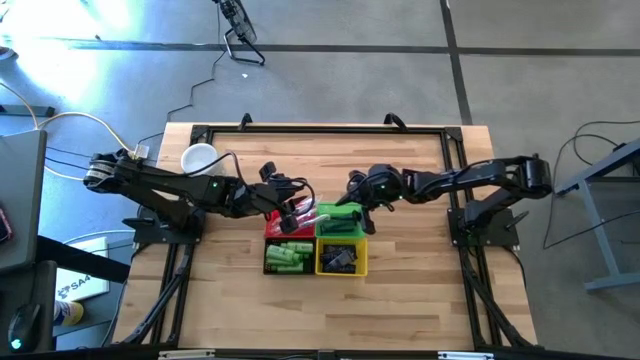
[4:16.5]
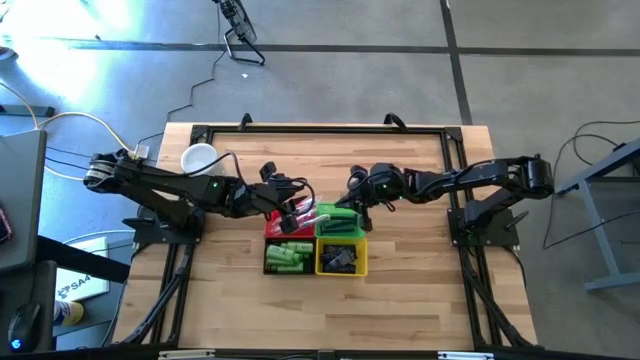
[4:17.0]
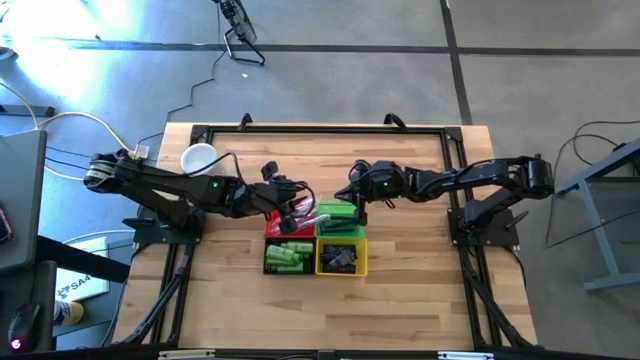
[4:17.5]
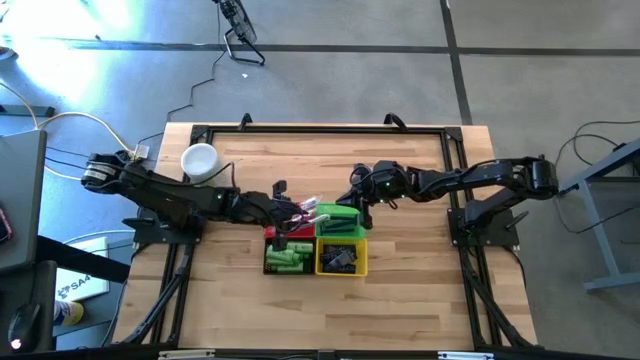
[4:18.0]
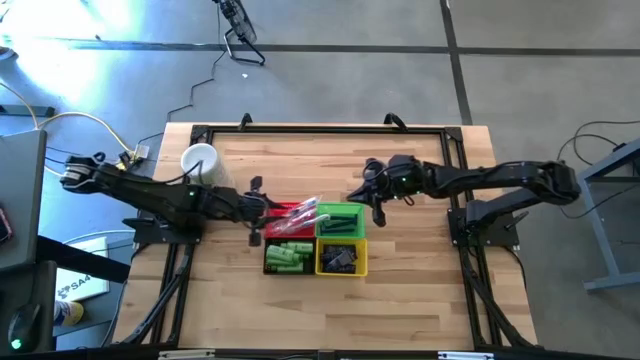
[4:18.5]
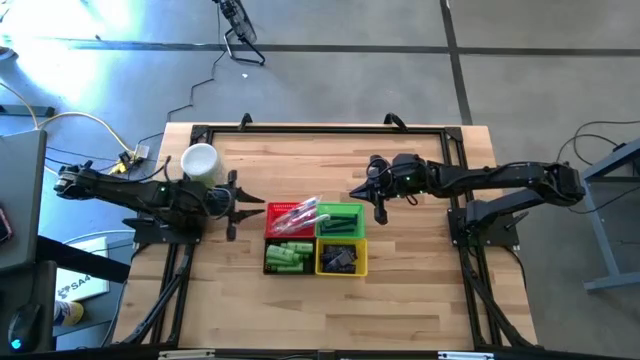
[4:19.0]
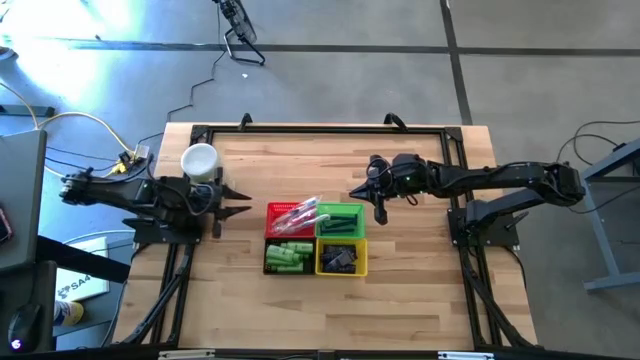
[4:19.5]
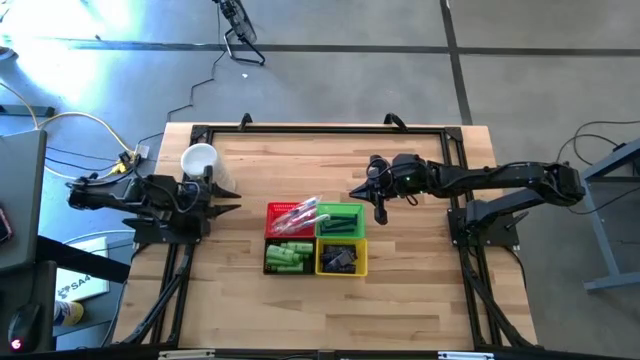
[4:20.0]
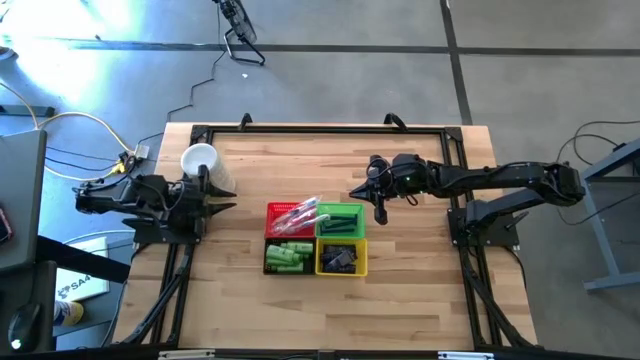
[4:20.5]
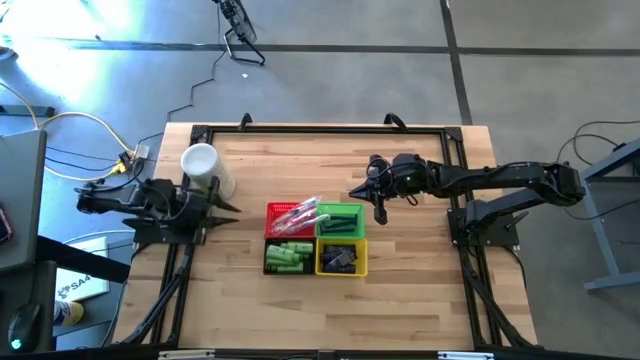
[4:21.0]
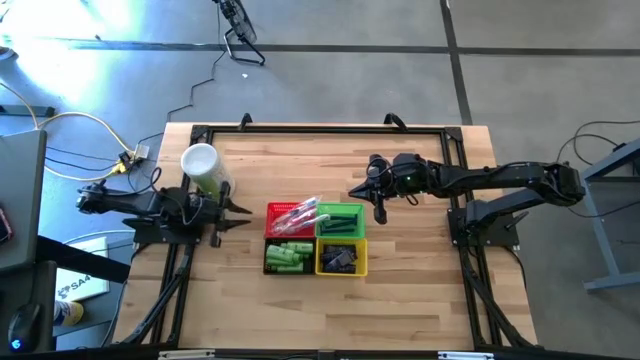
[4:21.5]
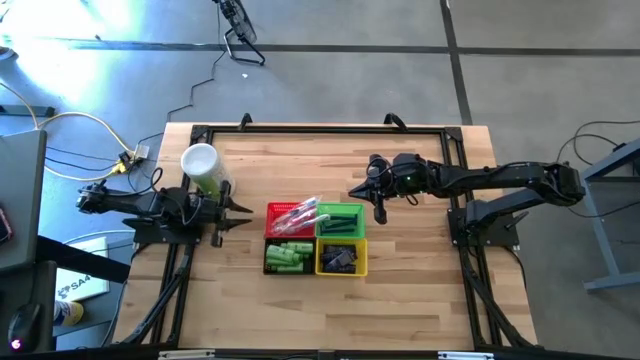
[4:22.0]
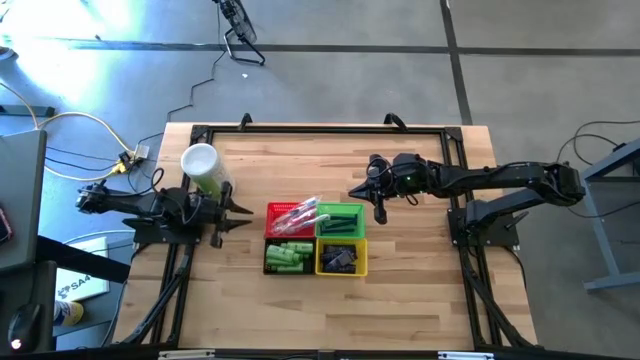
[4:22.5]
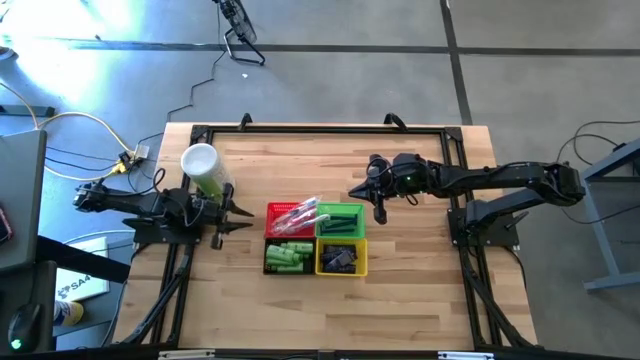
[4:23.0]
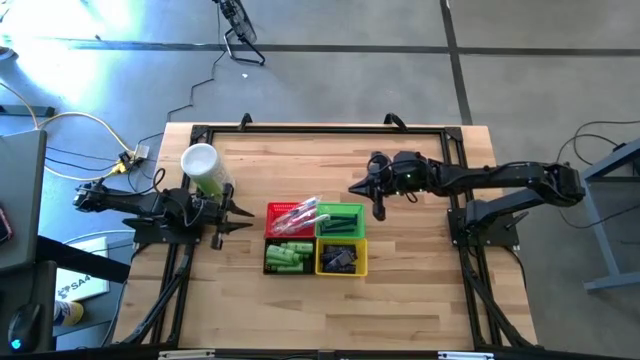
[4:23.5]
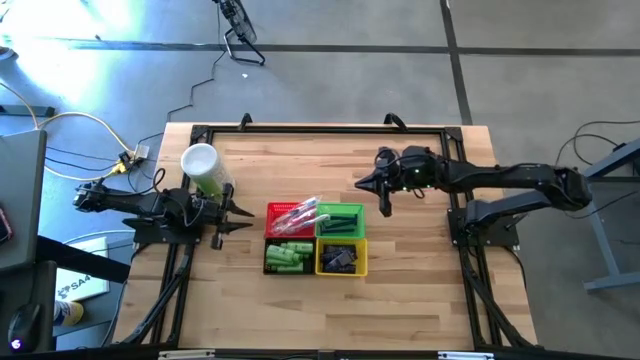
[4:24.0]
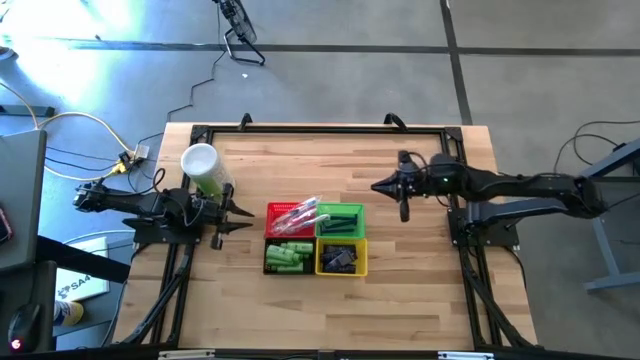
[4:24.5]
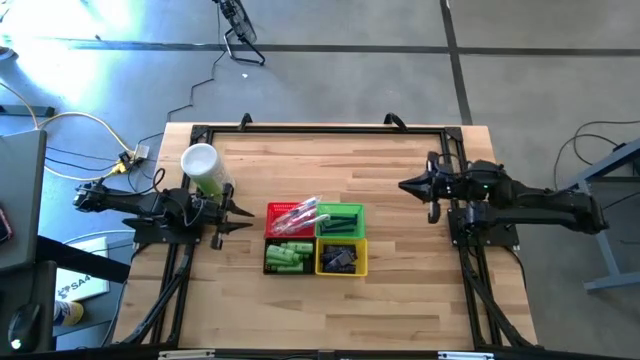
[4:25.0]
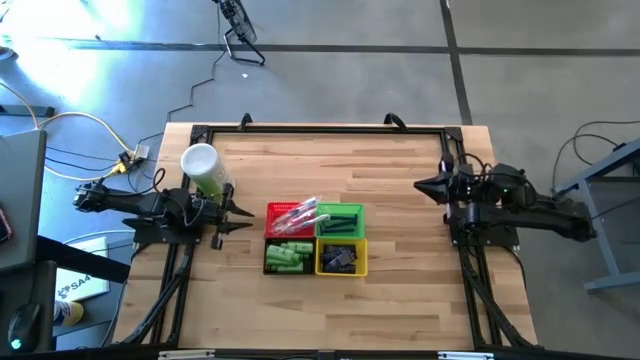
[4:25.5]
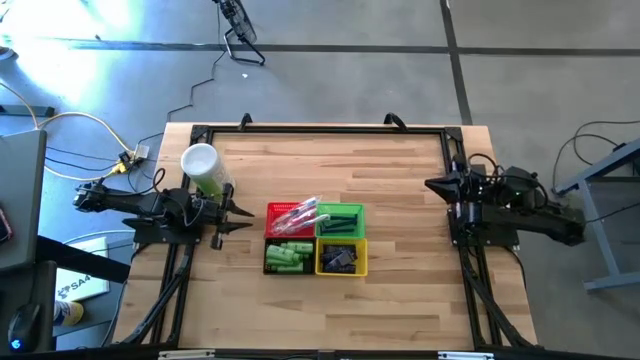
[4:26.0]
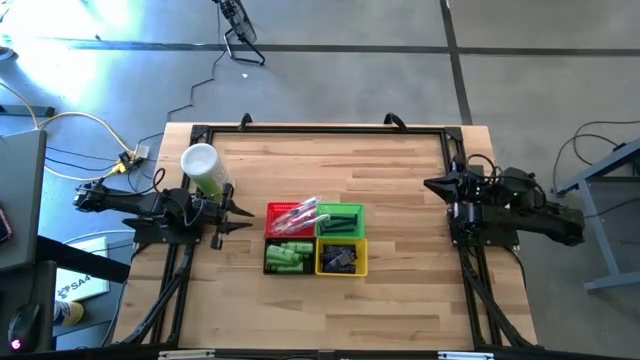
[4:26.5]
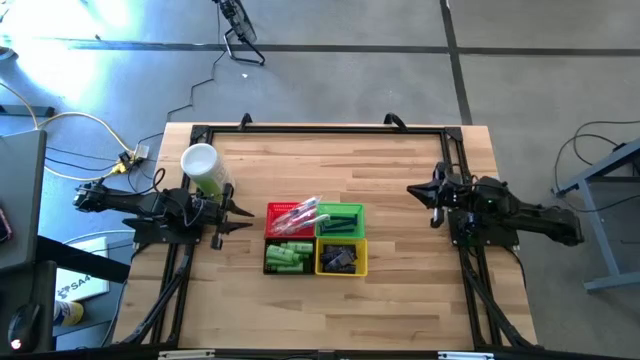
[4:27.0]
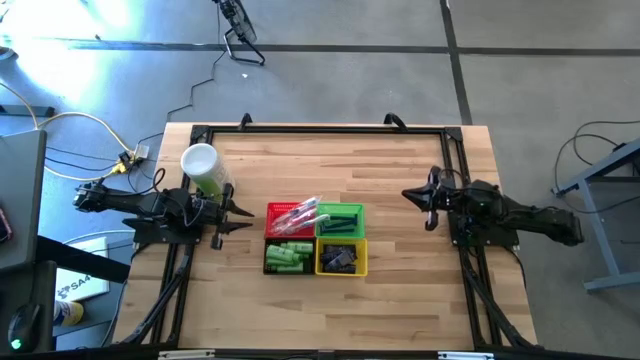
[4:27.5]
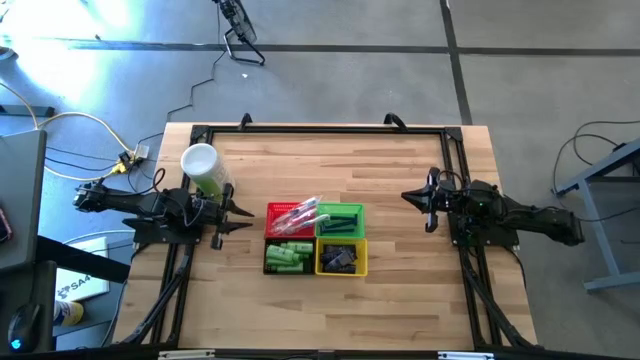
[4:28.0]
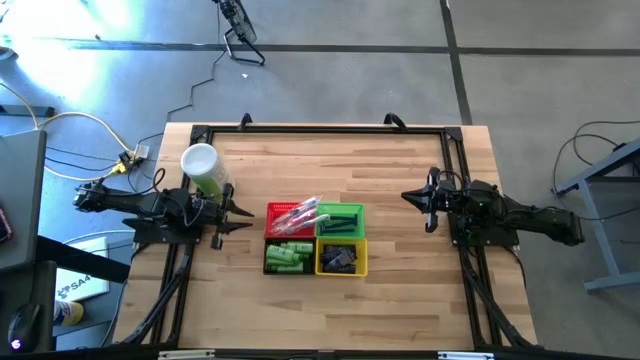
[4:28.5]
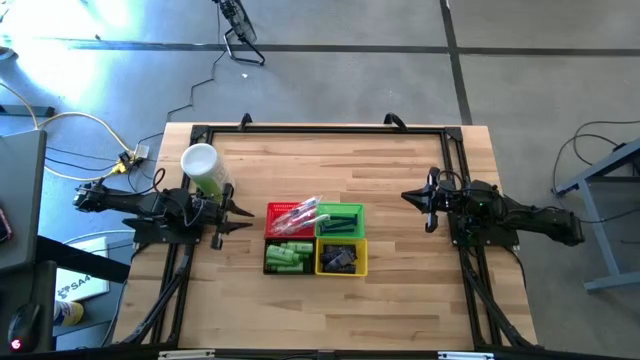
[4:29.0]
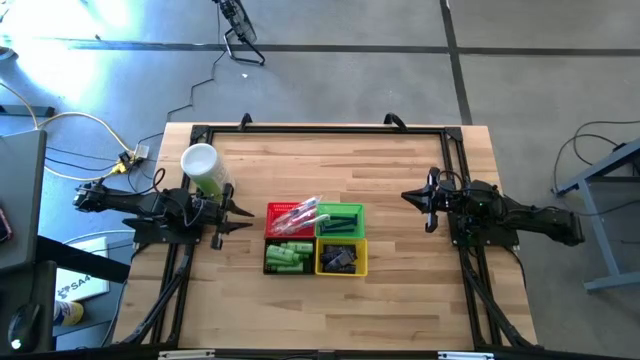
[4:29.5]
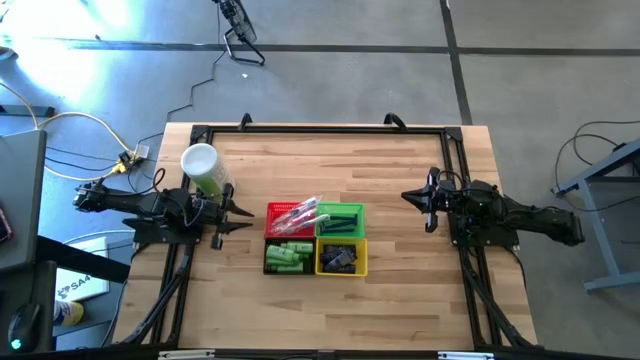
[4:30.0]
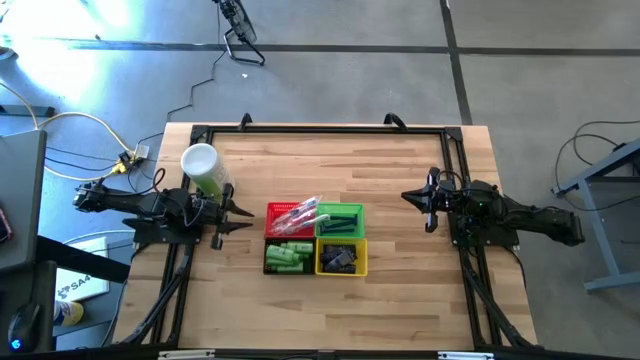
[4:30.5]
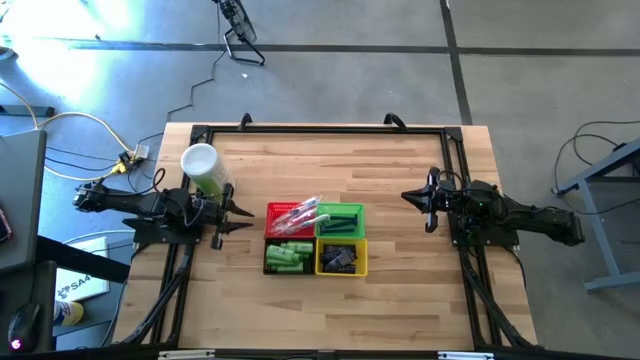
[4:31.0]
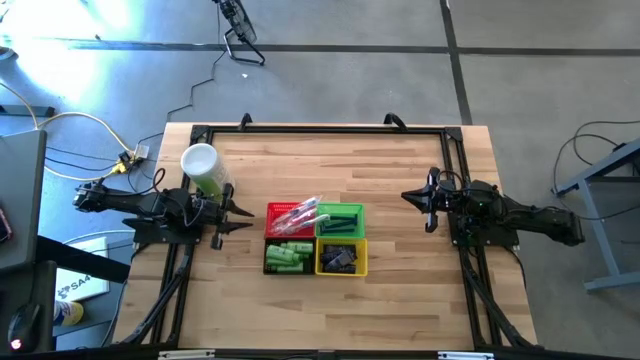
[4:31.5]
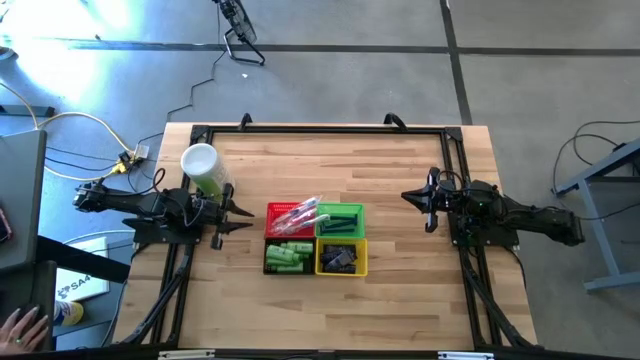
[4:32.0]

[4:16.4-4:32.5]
Task: Pick & Place Travel size toiletries
Return to Home Position

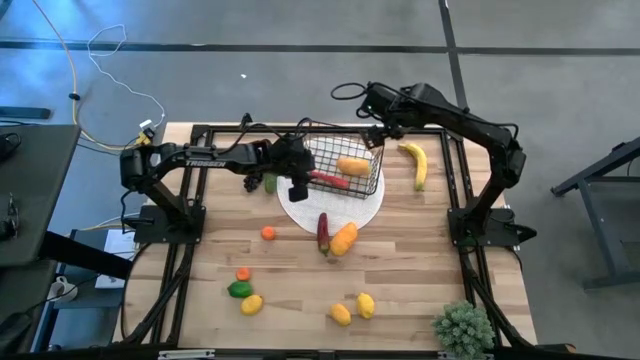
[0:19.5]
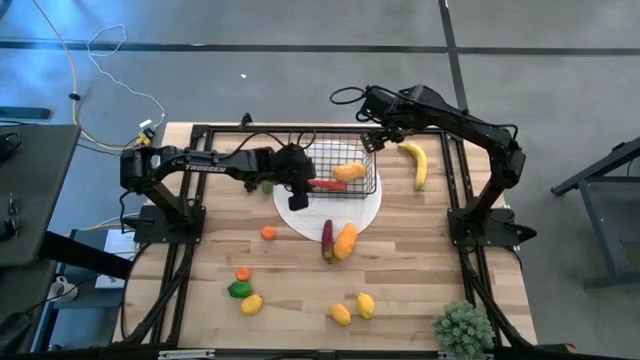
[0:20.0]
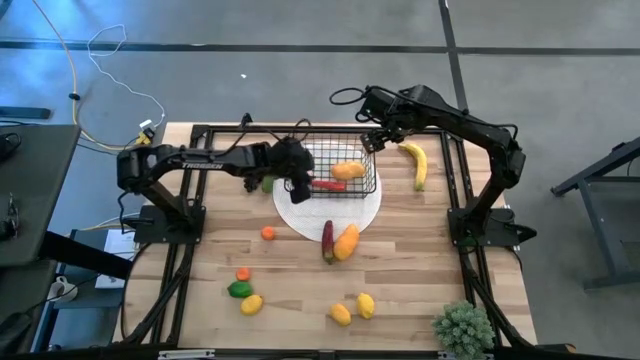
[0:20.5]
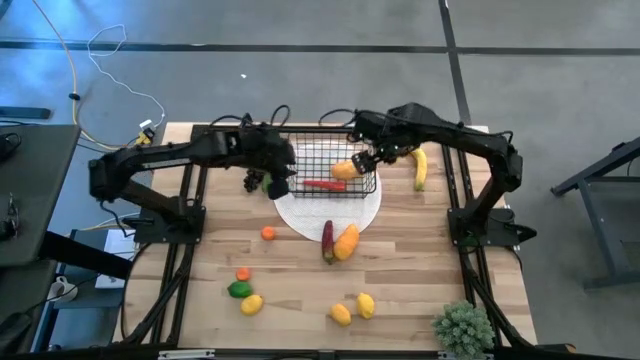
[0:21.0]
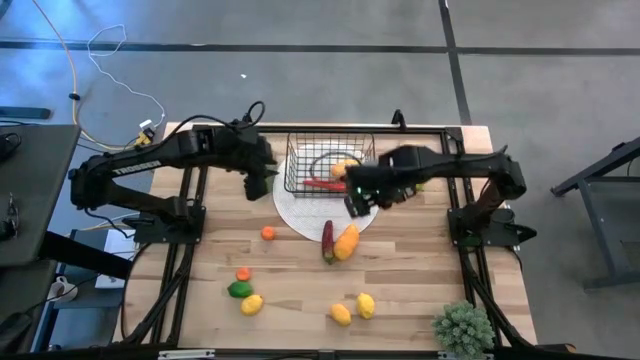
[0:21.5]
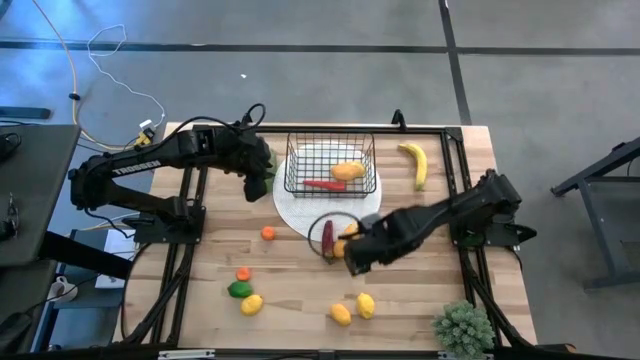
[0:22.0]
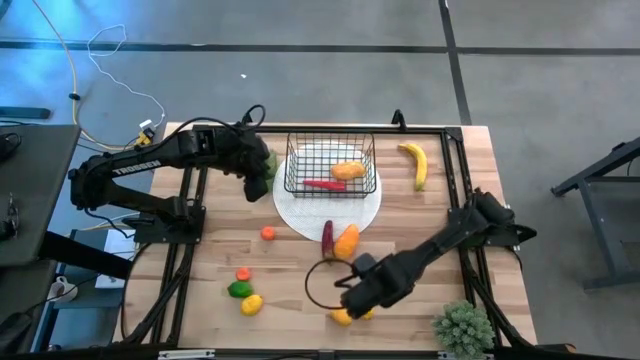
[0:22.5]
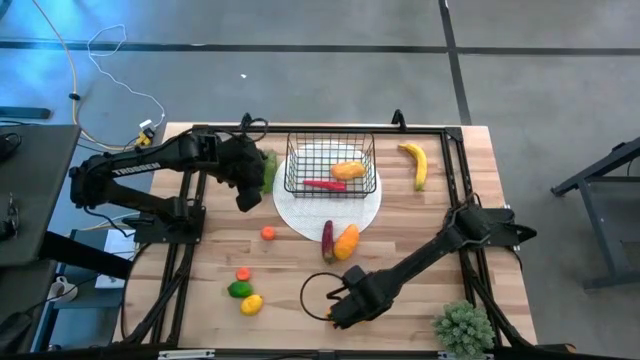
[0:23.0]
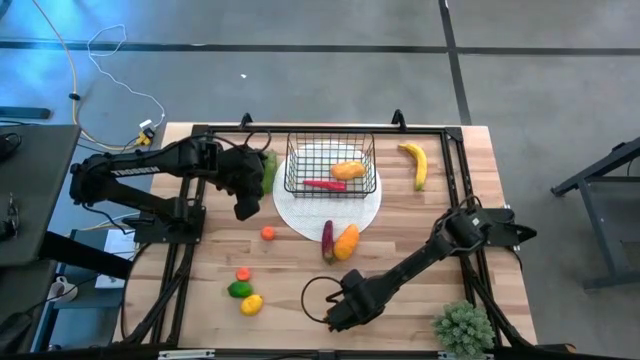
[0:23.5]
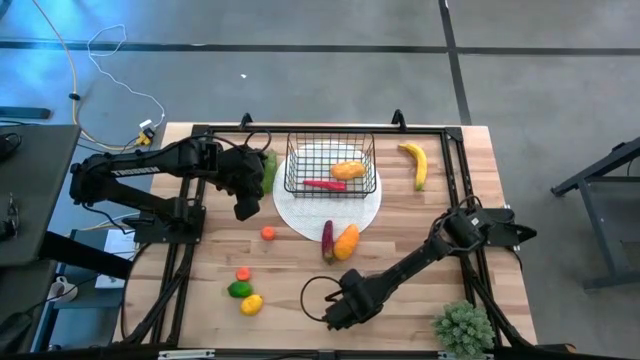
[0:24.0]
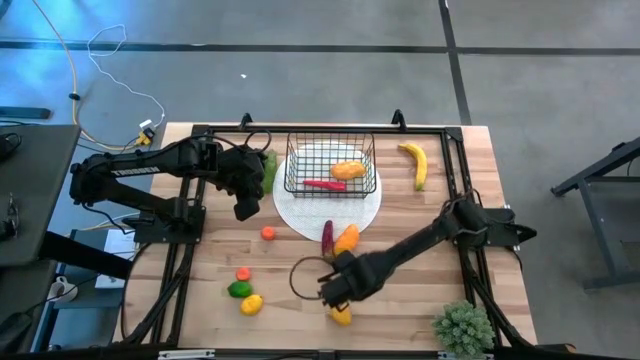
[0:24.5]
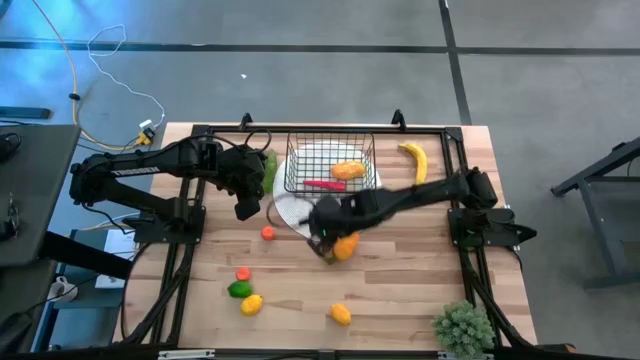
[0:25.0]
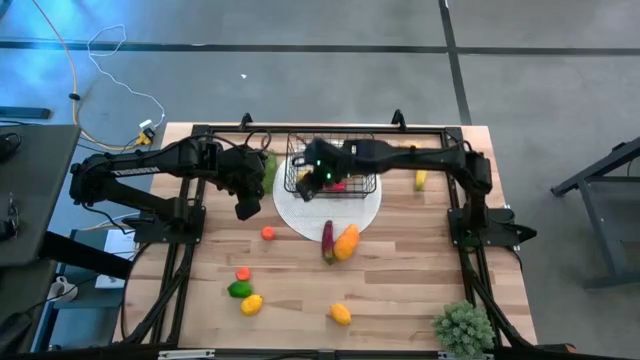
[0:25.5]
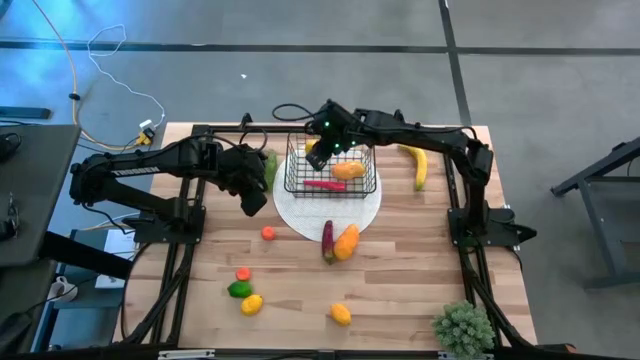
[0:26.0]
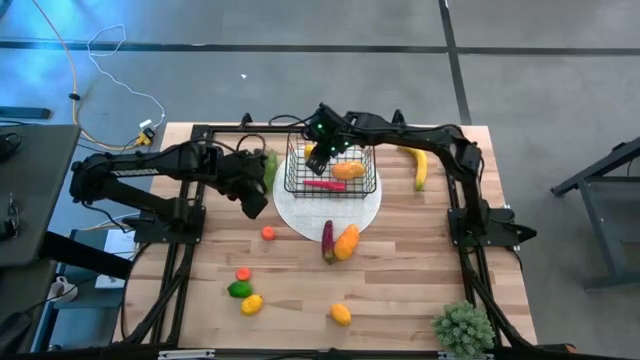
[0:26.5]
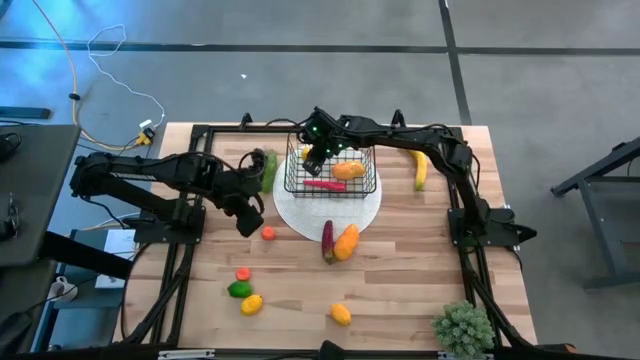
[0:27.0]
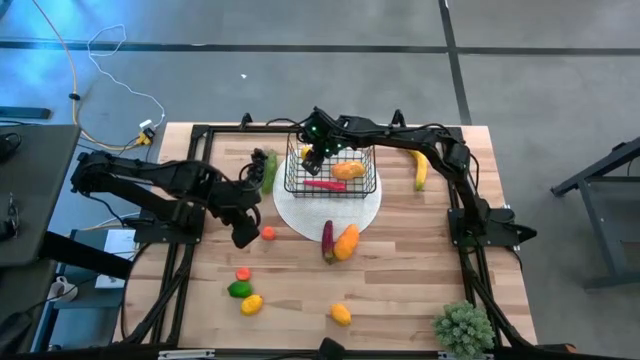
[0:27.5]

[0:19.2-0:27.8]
Task: Build produce basket
Put the right lemon into the wire basket
